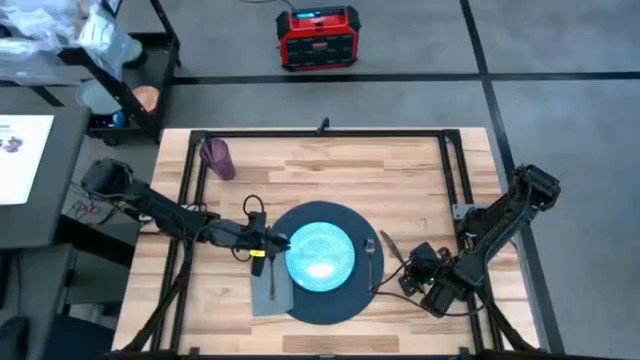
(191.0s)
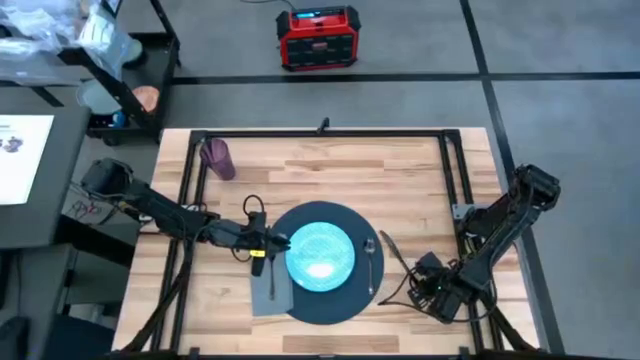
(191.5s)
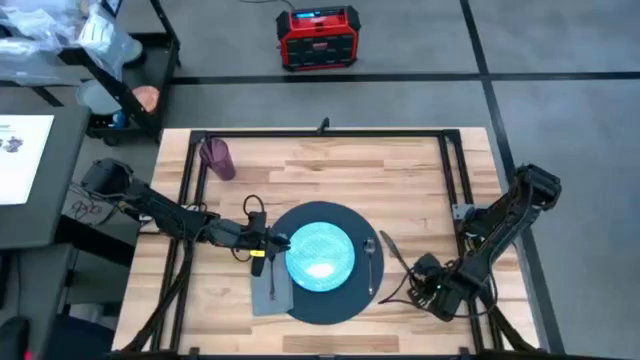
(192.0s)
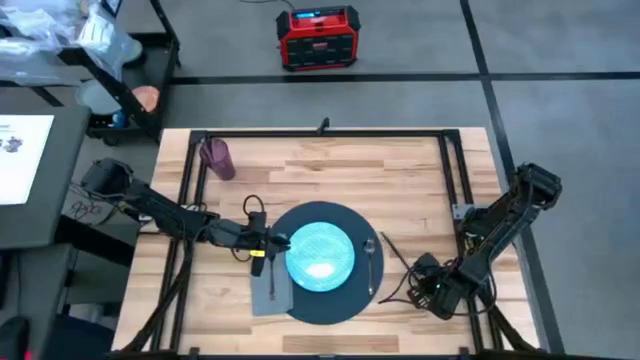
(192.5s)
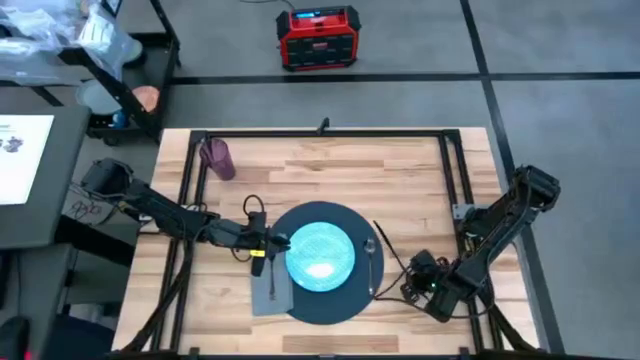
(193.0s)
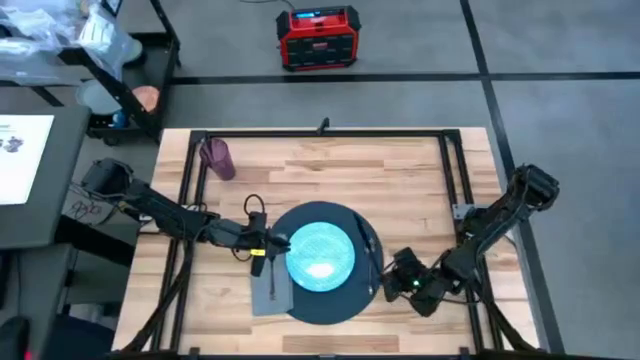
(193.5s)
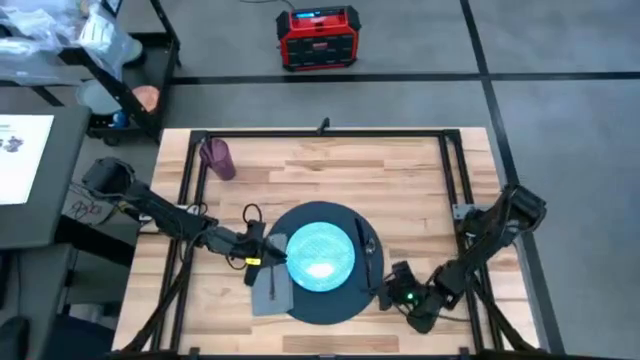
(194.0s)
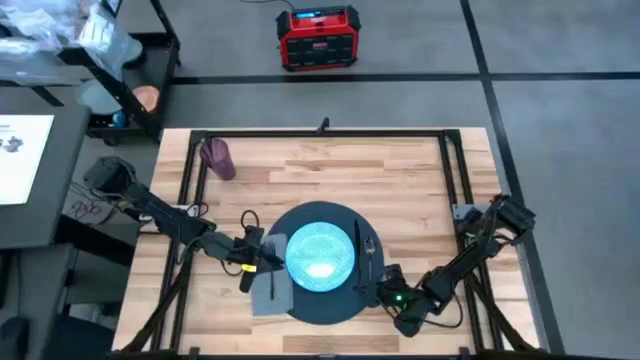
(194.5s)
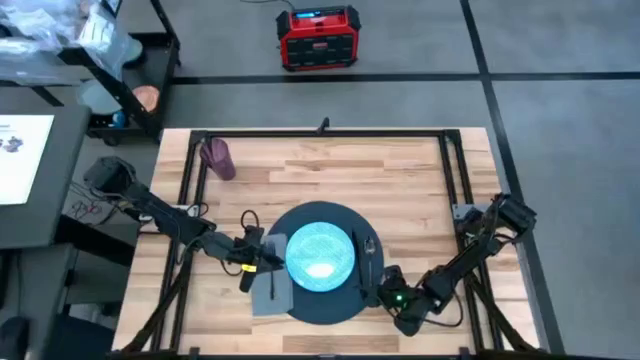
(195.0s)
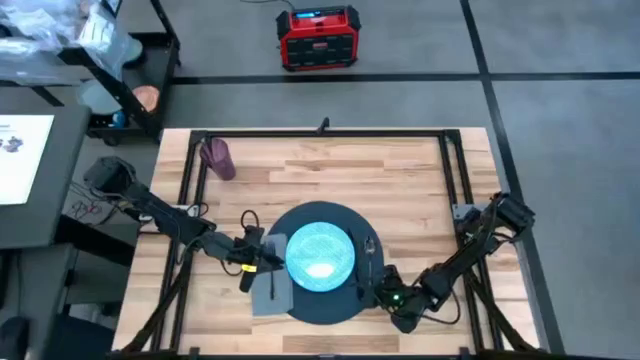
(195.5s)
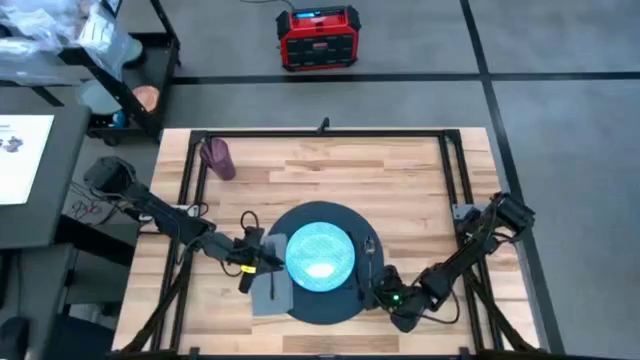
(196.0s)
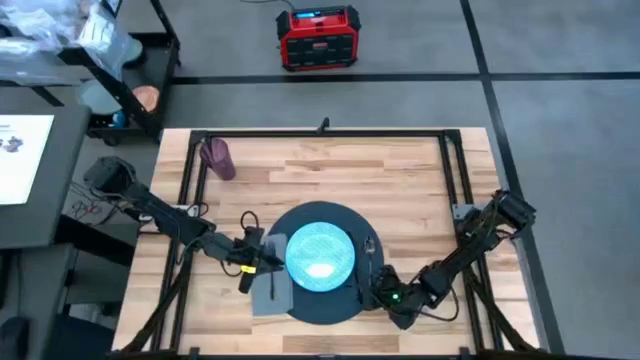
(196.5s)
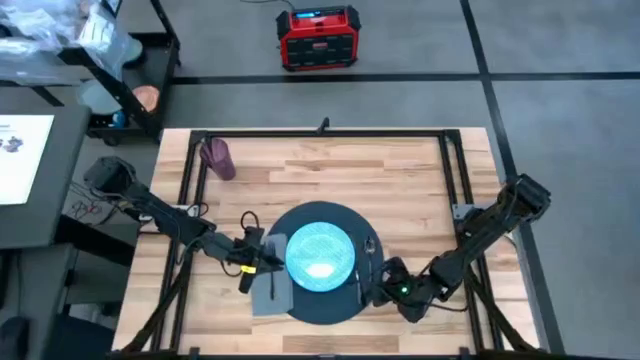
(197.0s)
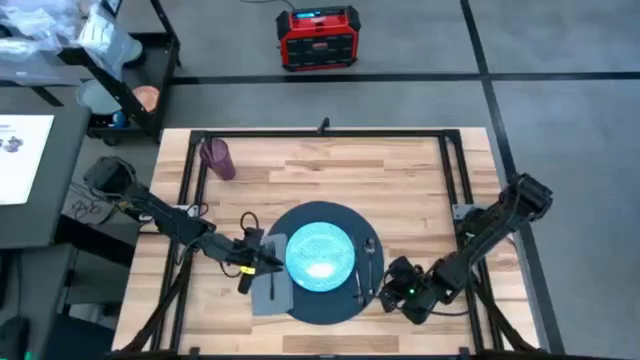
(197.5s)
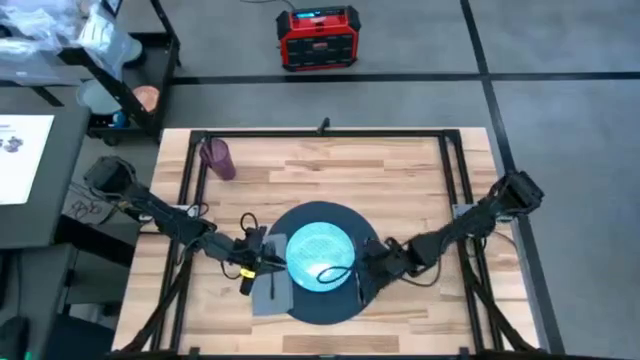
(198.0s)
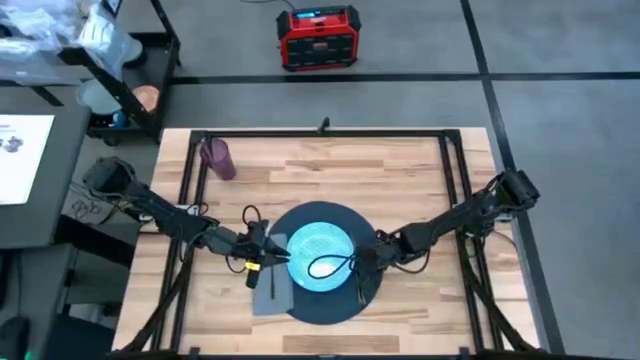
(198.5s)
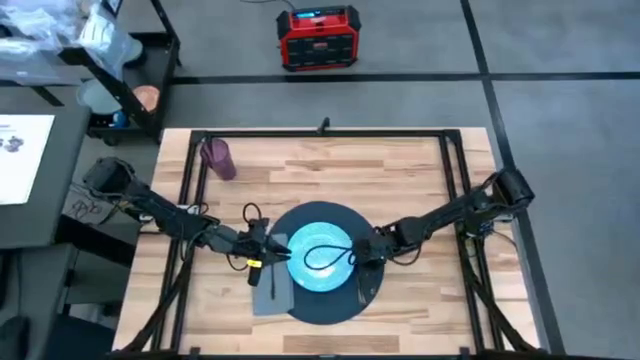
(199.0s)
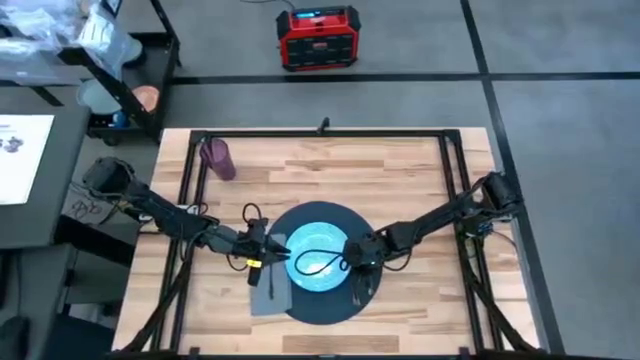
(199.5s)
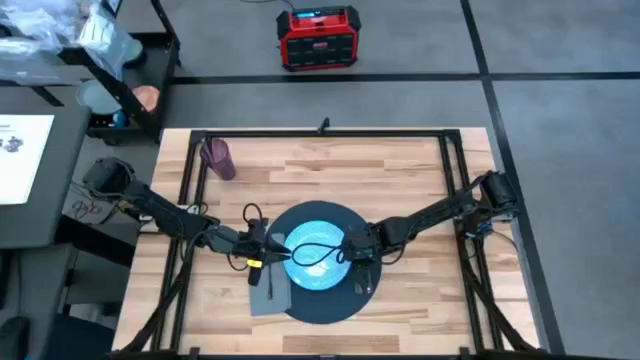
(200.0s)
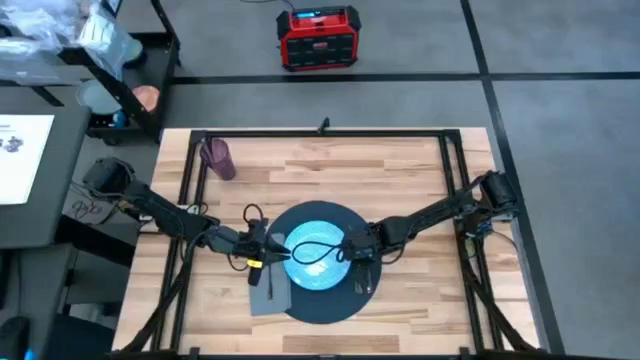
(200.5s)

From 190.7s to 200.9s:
Task: Set table place
Put the black knife on the dark blue table mat

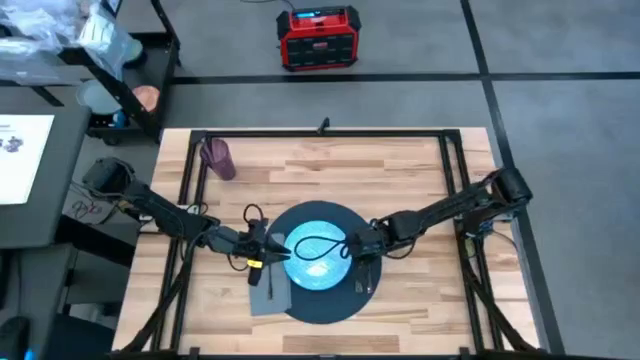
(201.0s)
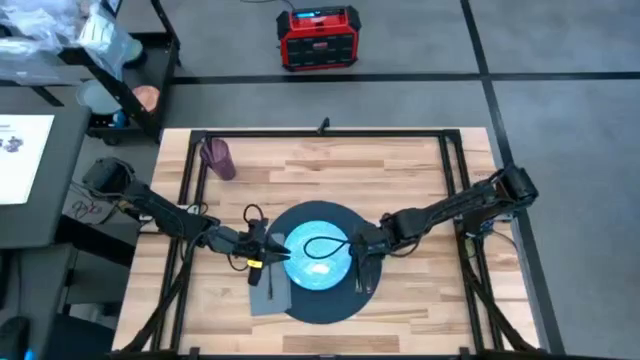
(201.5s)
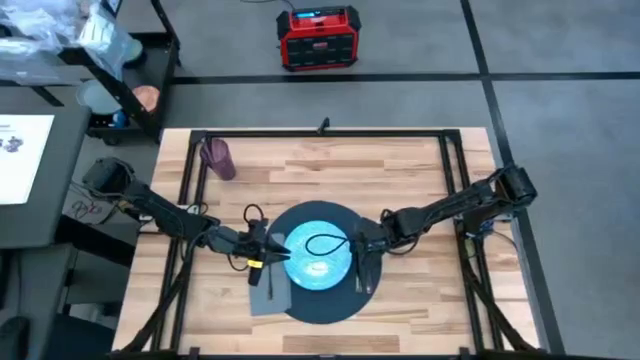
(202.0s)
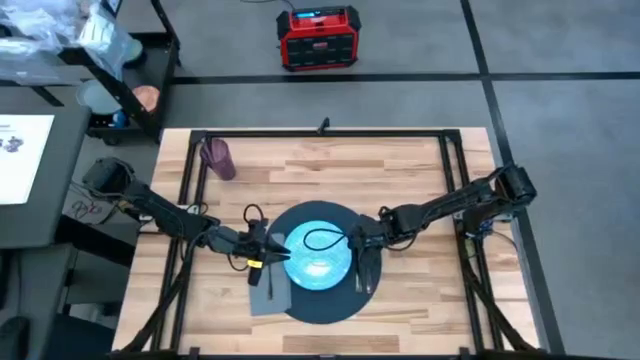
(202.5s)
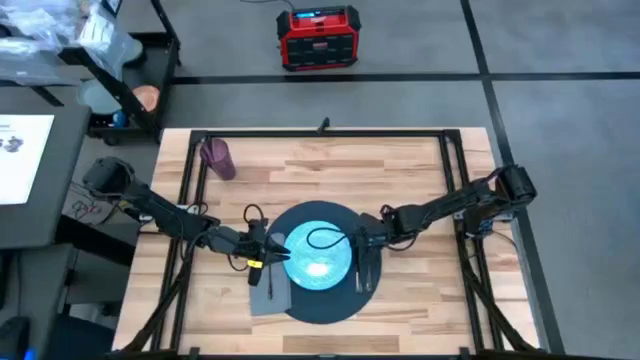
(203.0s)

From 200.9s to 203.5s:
Adjust the black spoon on the dark blue table mat

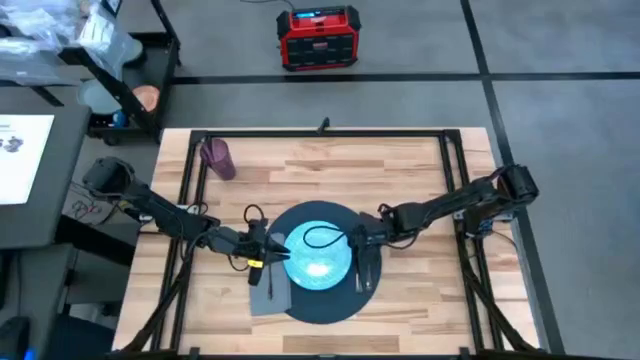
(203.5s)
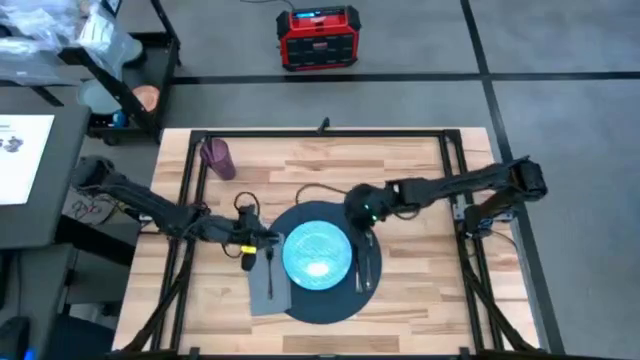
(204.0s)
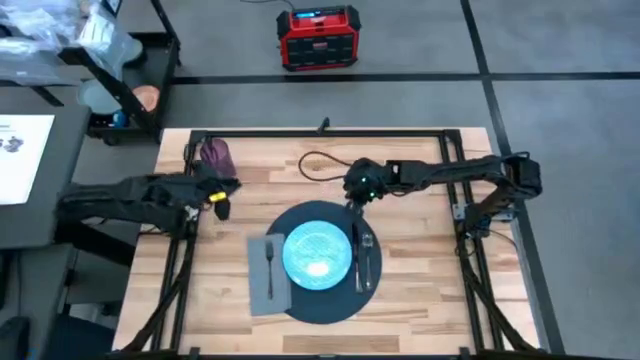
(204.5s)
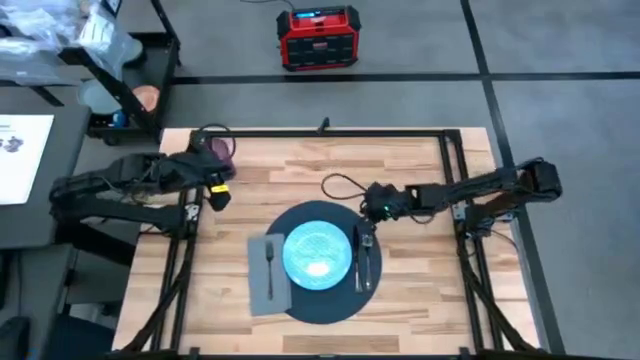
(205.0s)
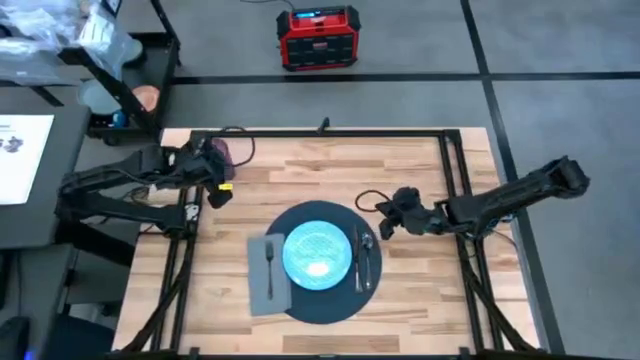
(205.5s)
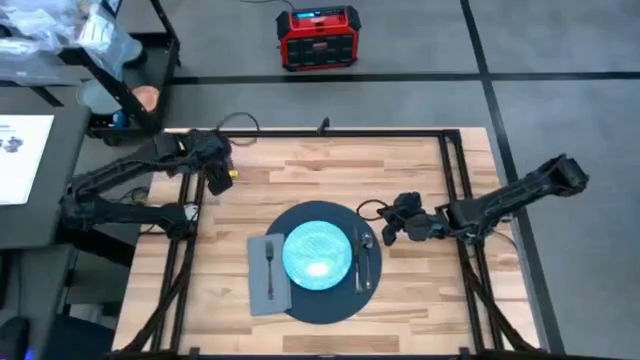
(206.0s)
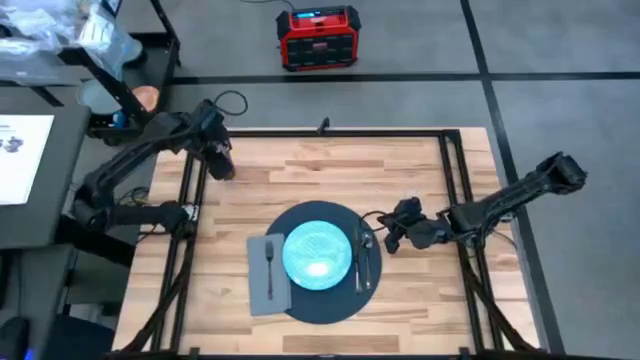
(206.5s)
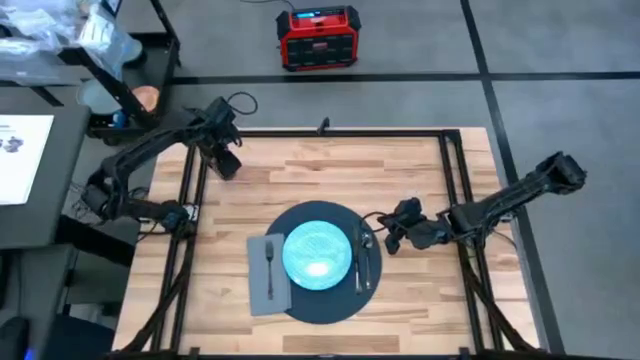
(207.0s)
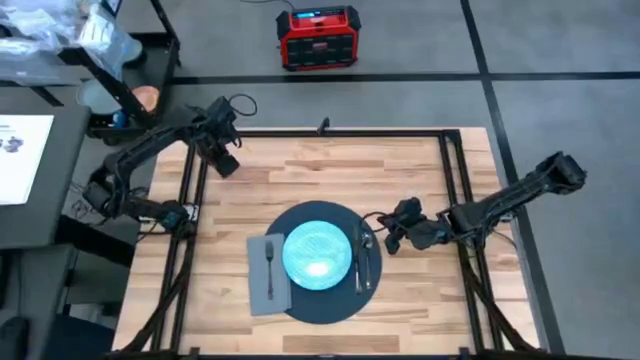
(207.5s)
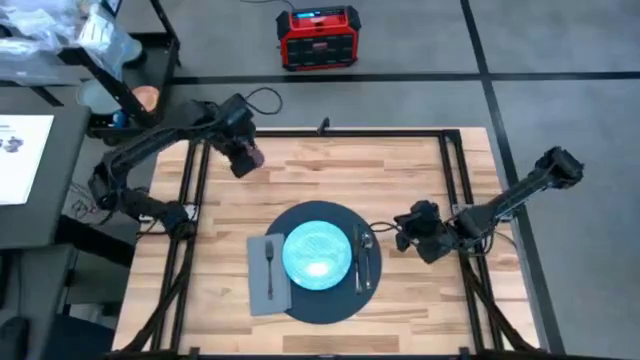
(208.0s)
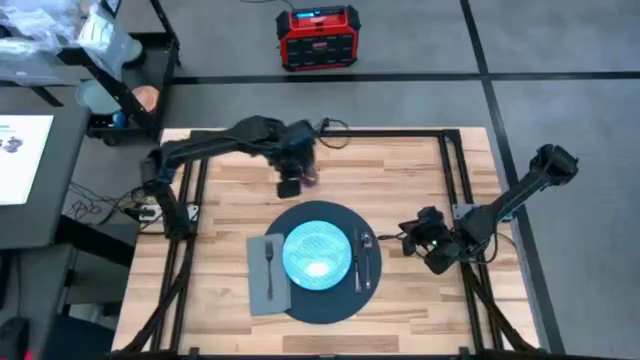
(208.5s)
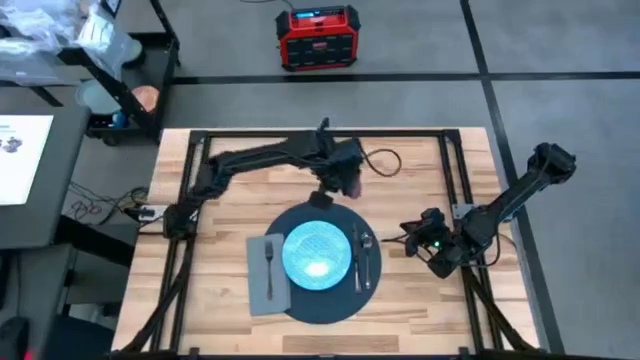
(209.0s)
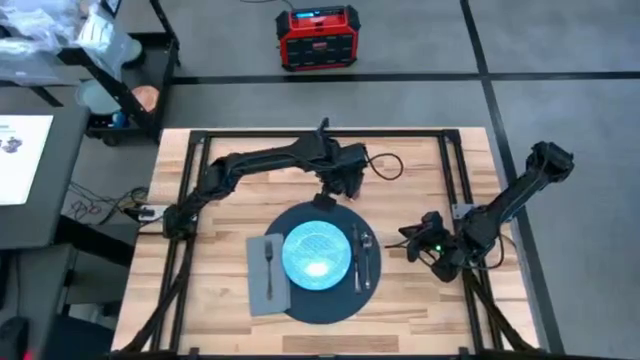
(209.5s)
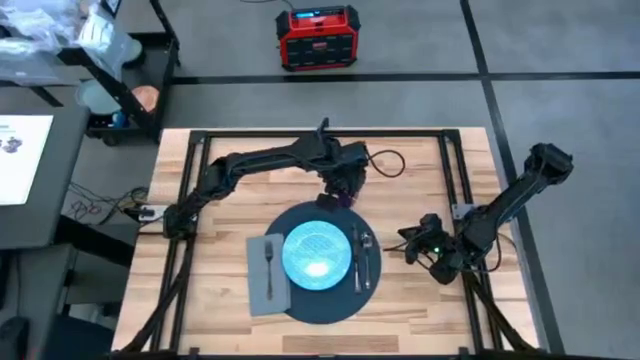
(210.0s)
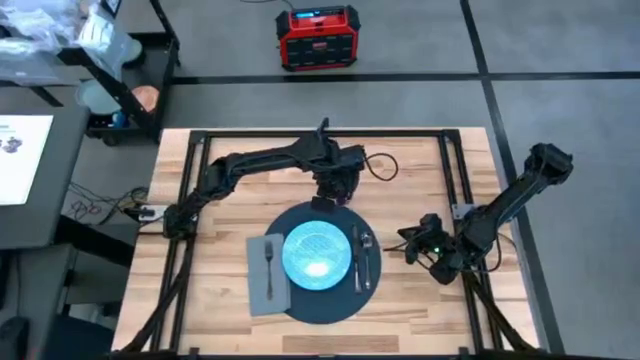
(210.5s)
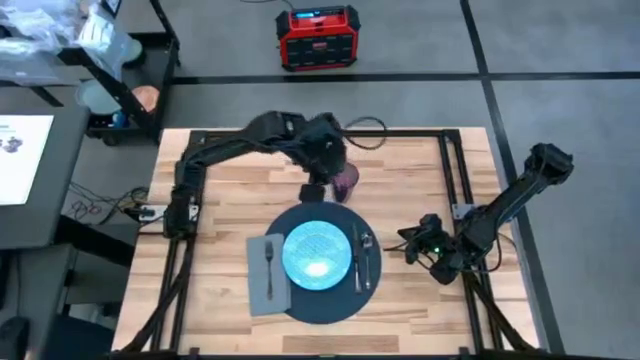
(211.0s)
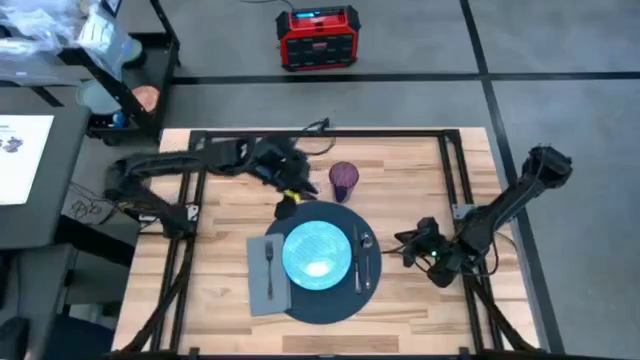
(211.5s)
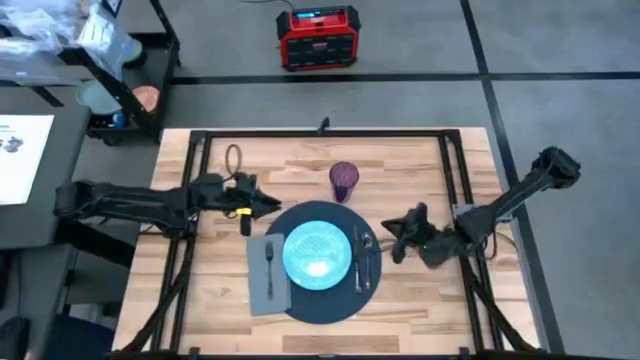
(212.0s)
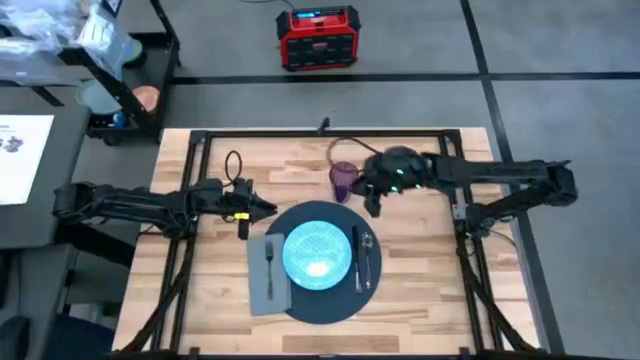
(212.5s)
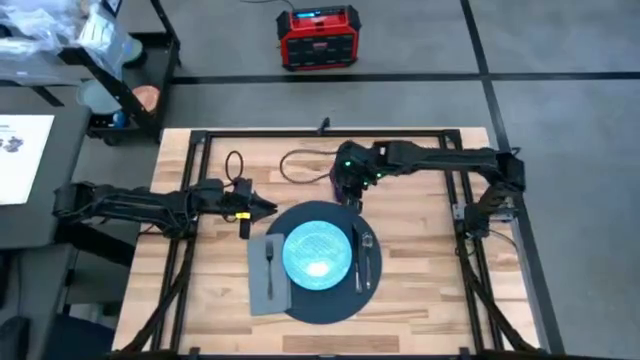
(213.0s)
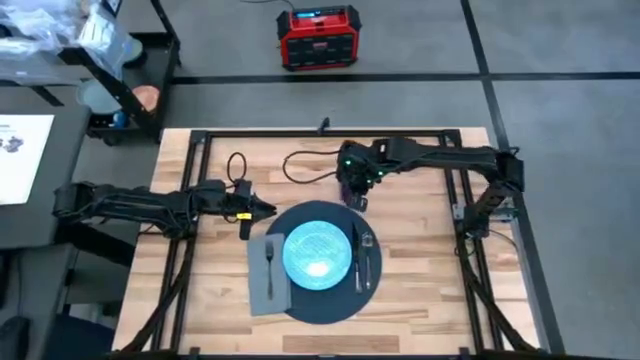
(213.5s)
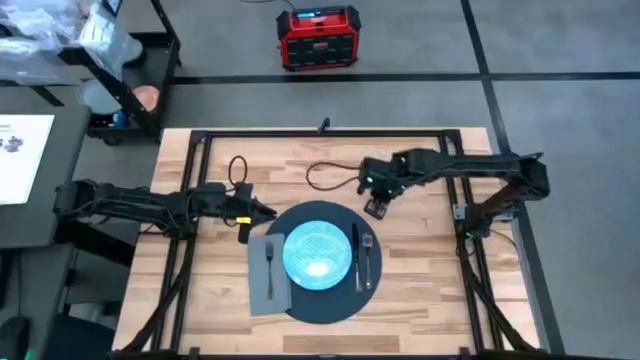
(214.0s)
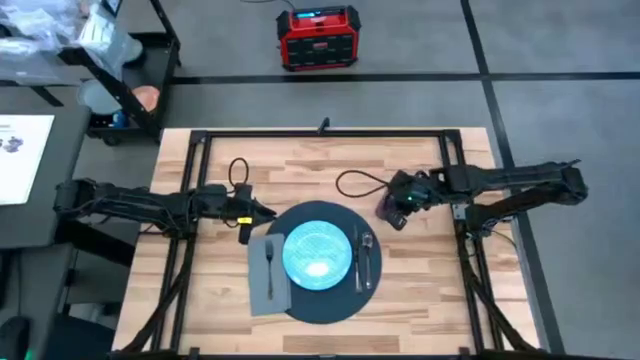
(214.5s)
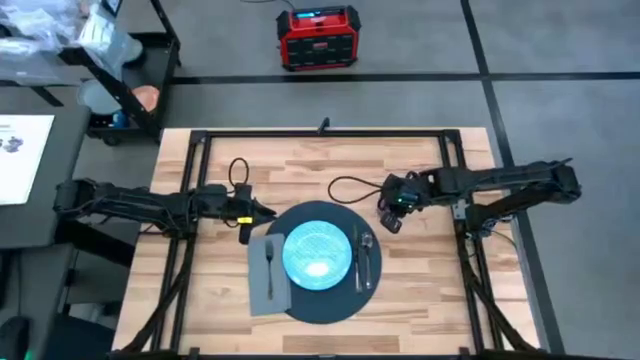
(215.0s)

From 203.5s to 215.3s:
Move the purple cup to the top right of the table
